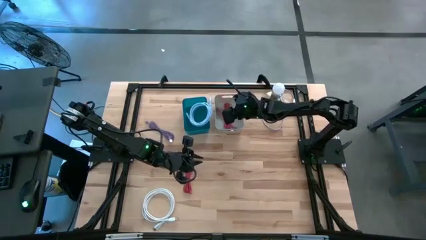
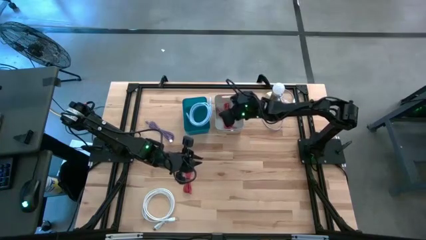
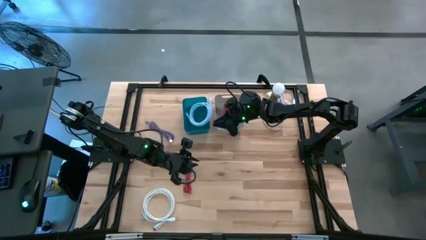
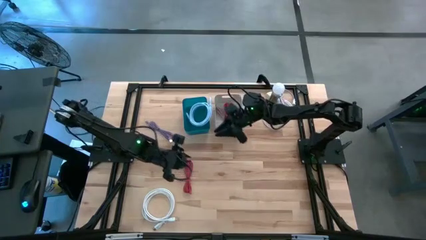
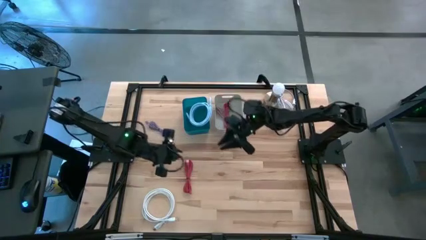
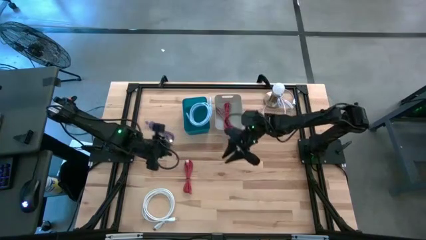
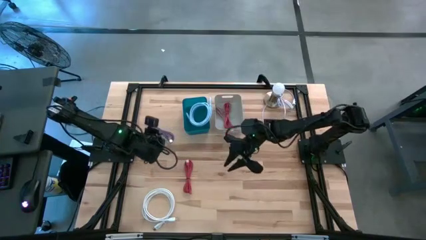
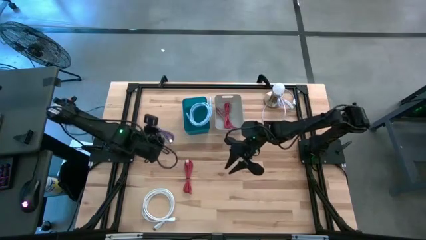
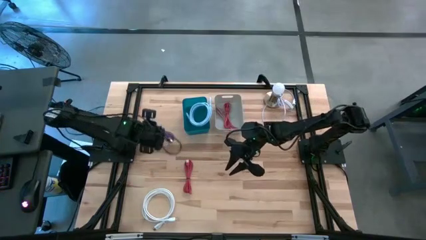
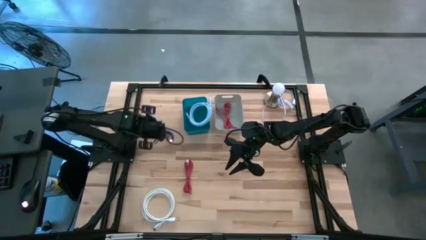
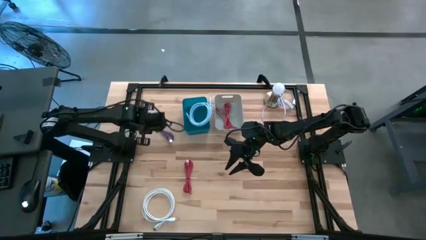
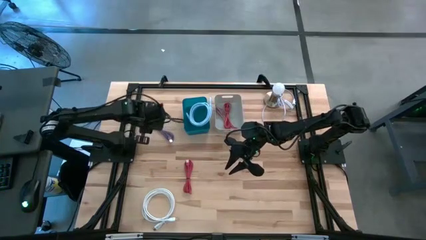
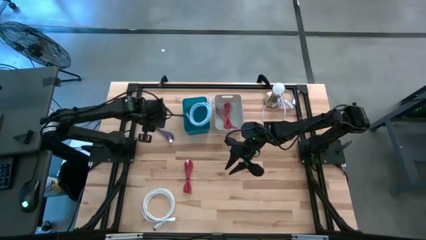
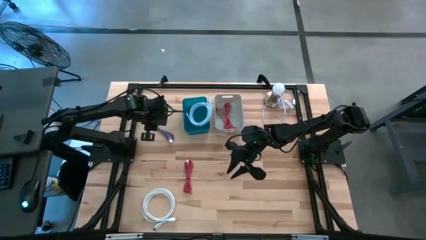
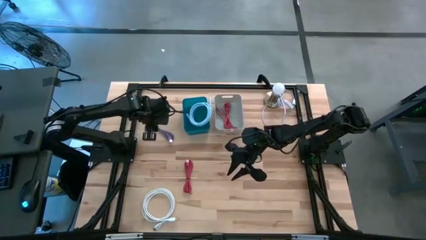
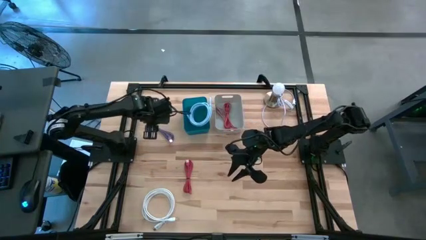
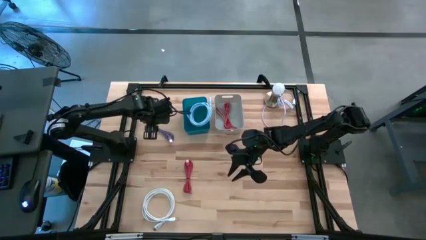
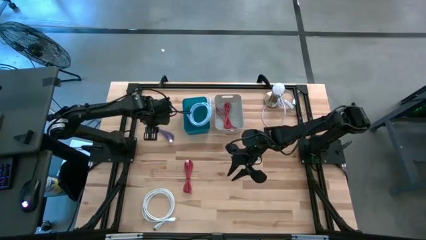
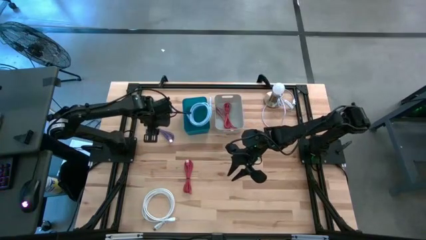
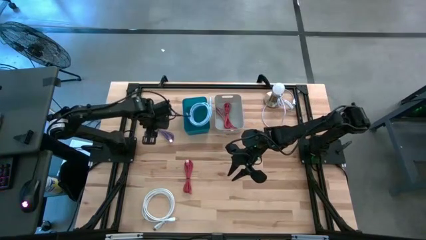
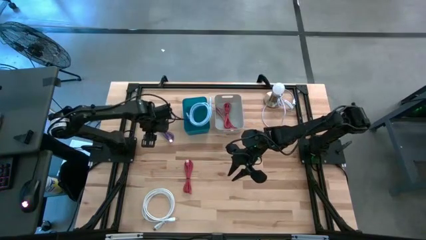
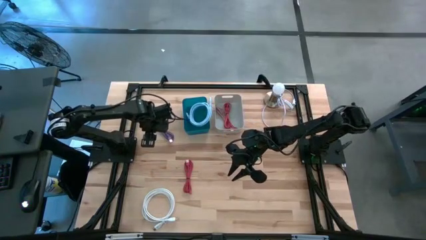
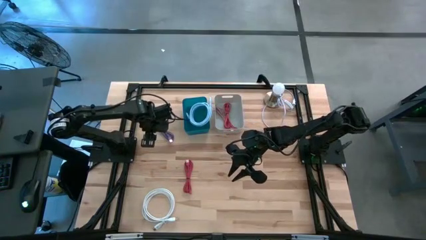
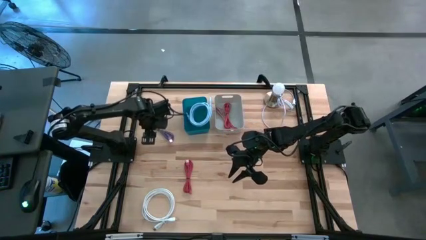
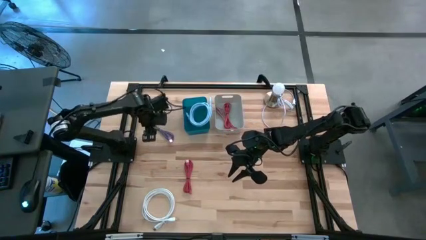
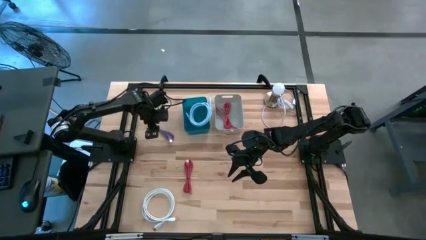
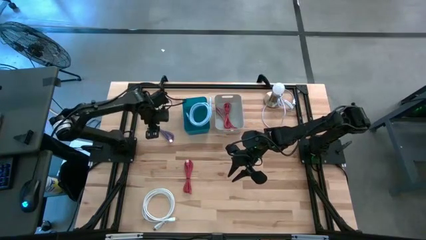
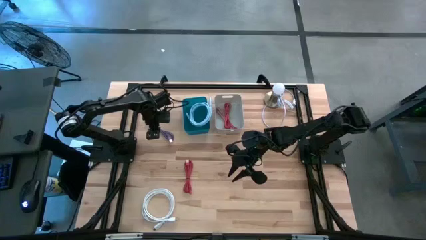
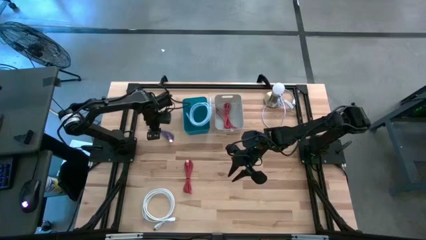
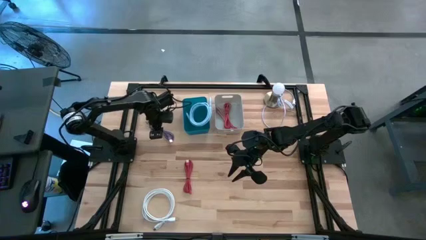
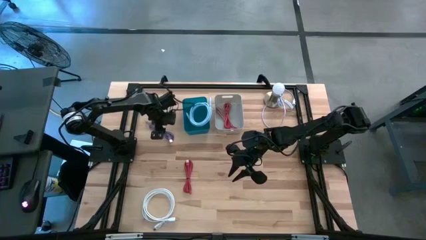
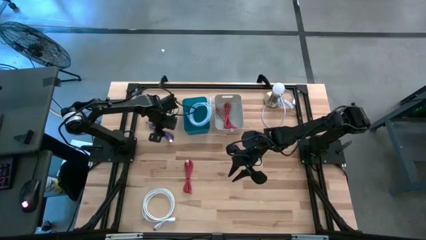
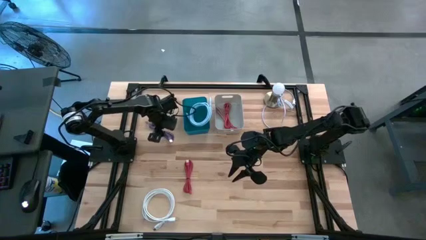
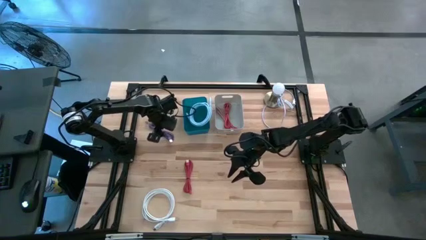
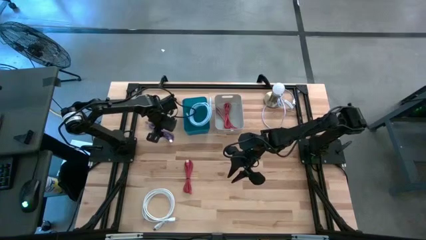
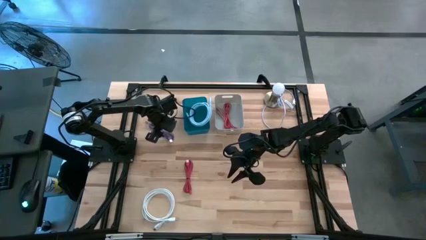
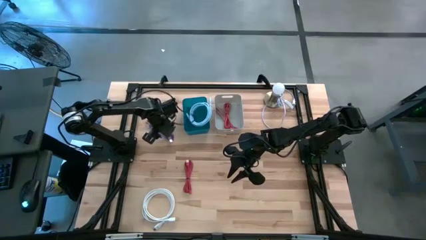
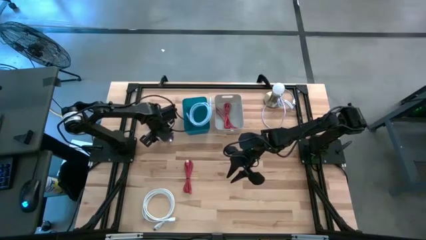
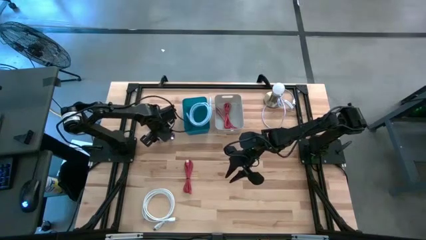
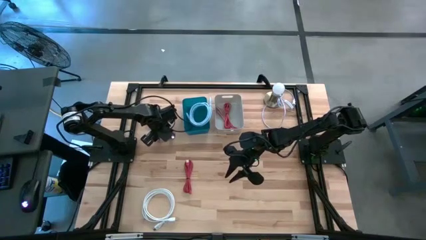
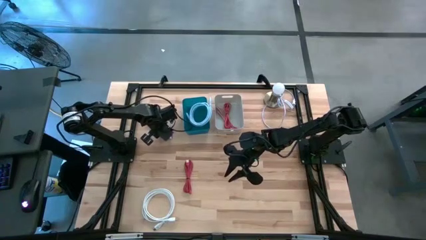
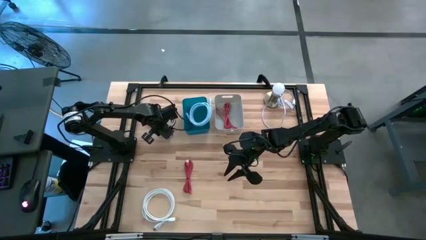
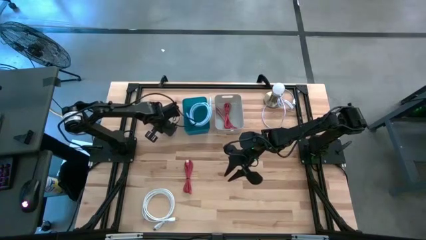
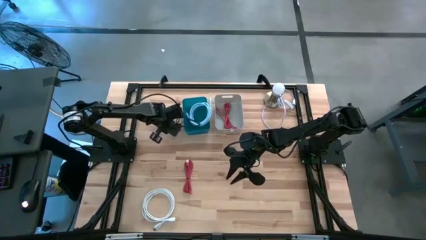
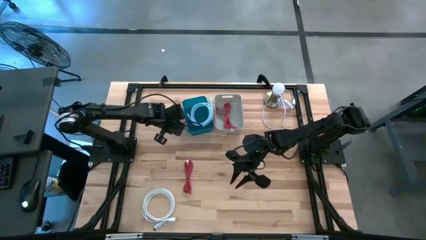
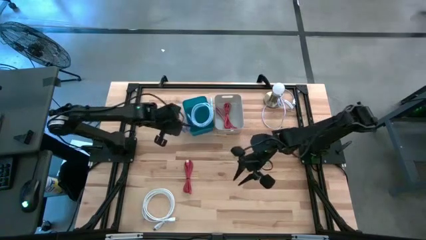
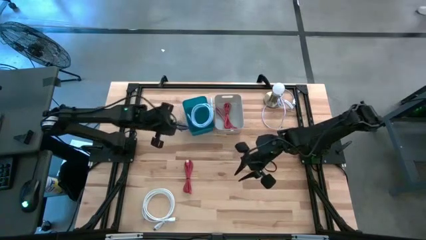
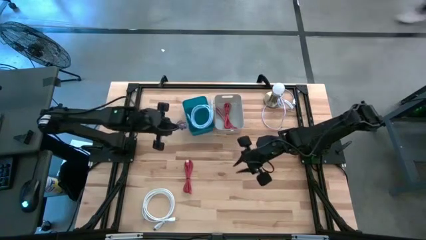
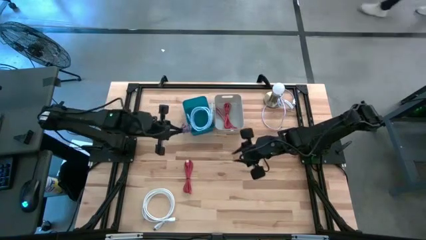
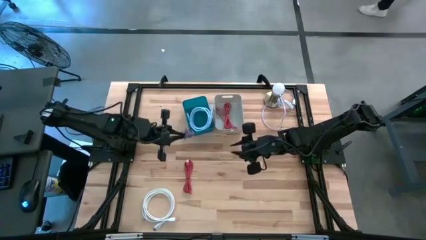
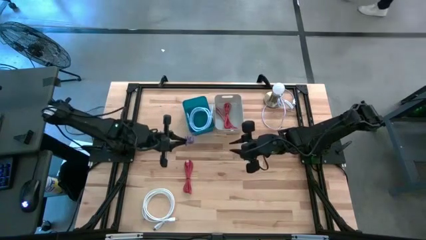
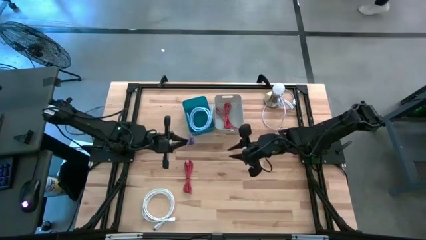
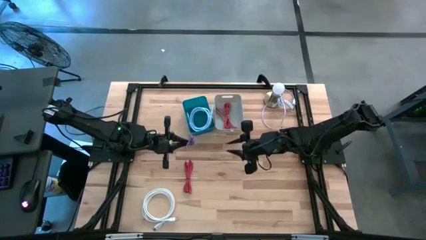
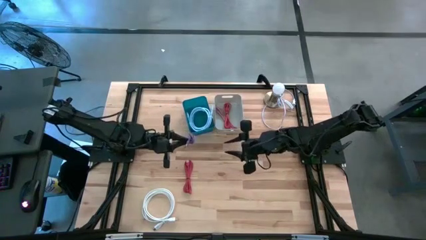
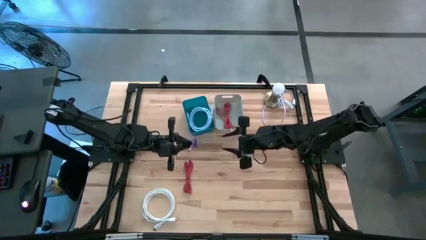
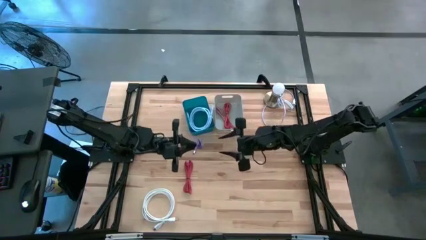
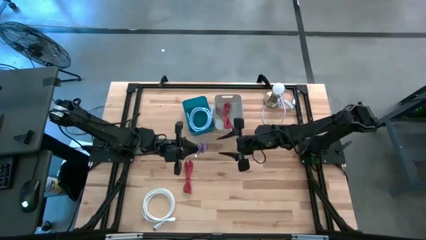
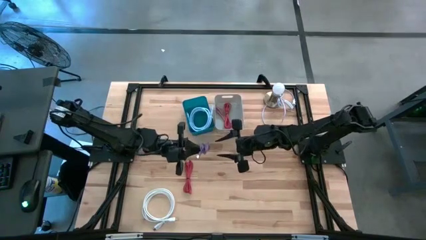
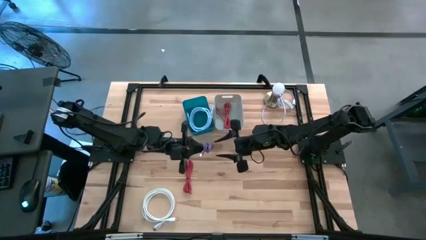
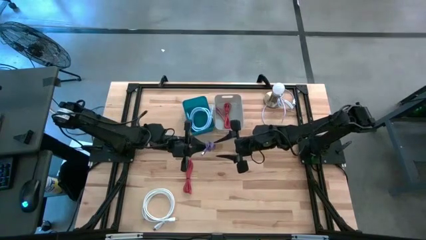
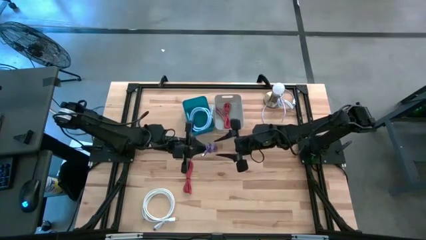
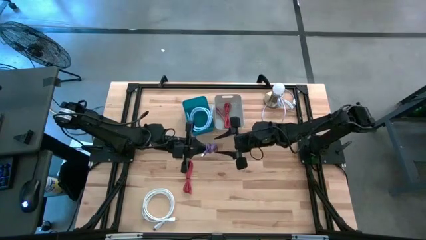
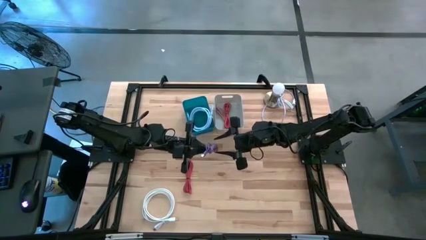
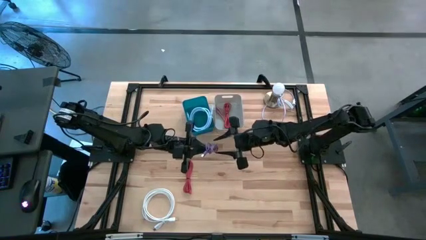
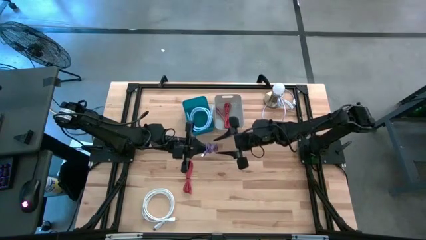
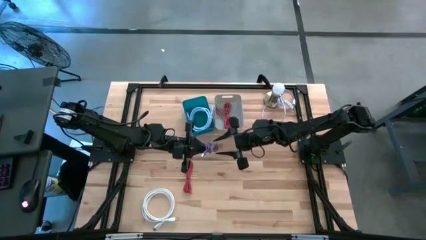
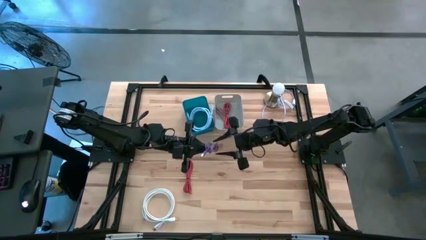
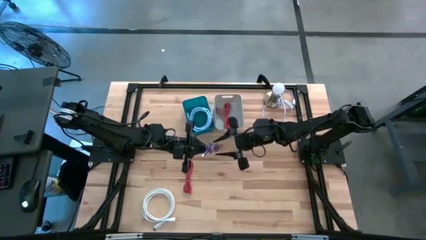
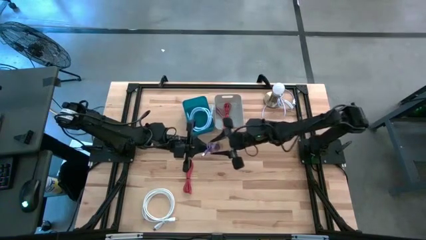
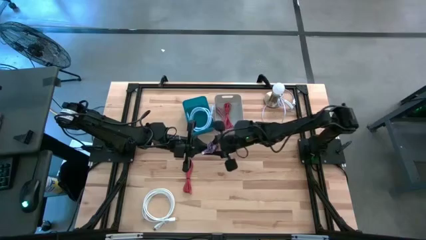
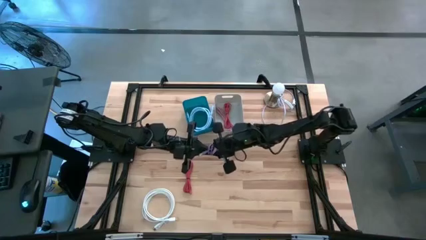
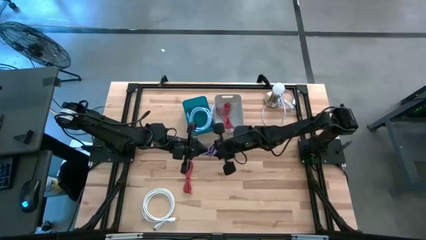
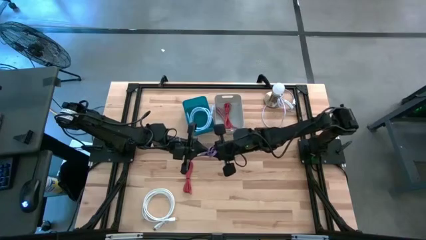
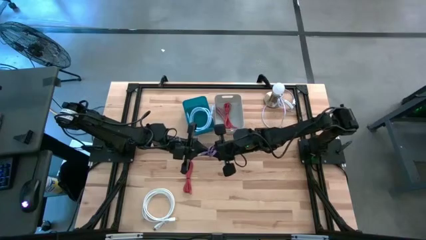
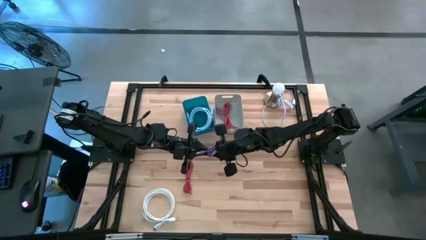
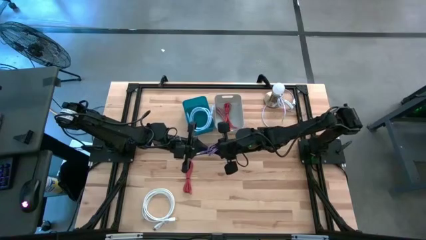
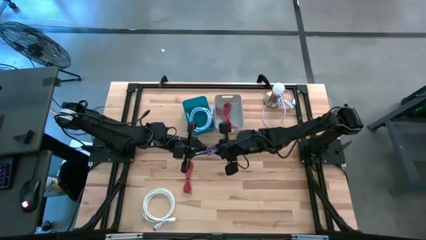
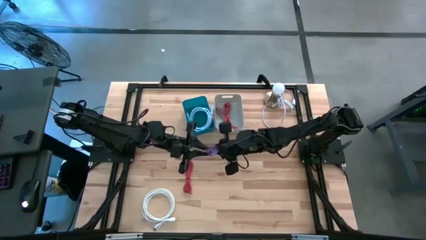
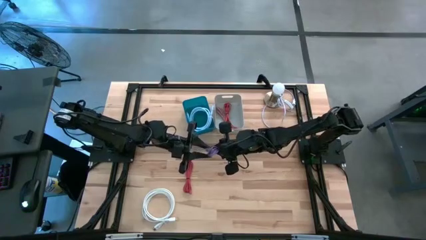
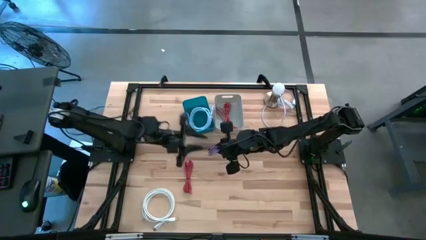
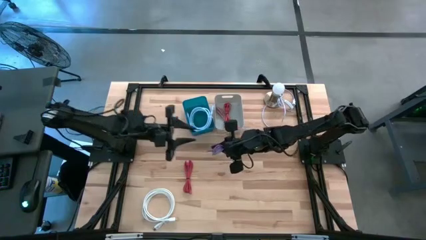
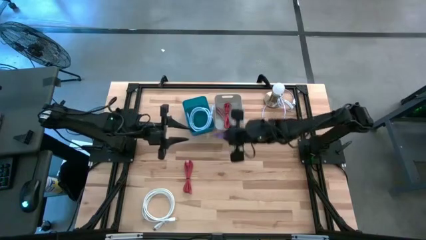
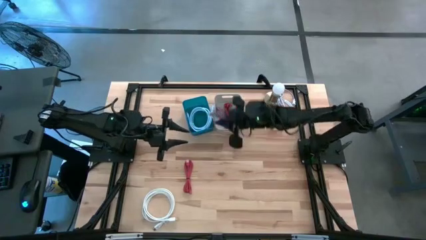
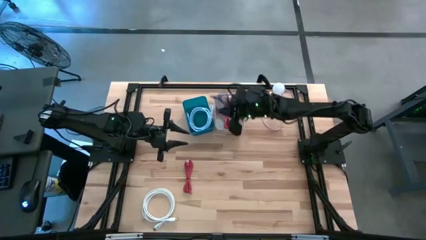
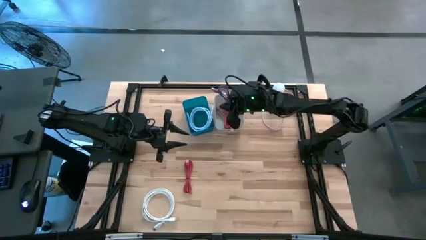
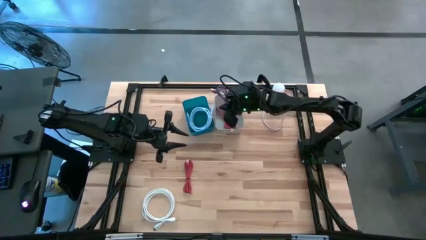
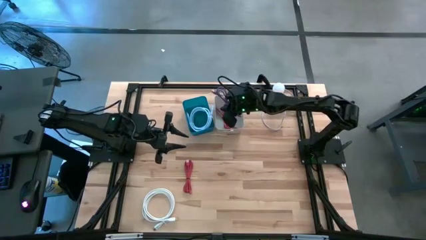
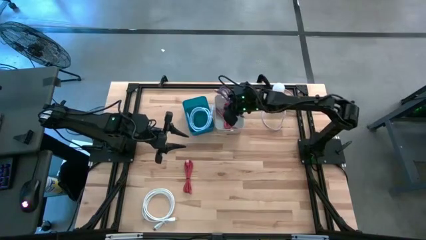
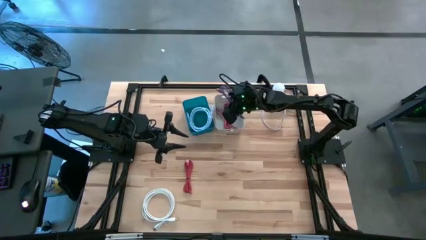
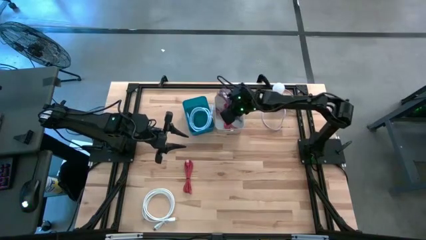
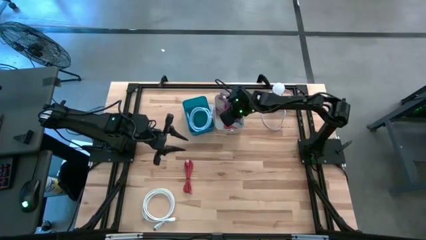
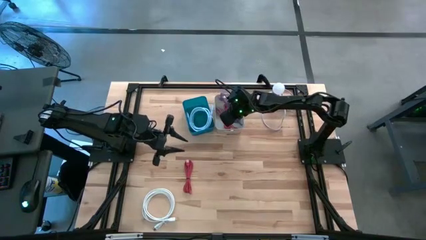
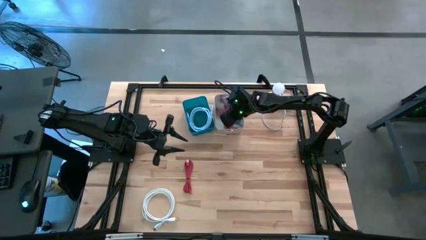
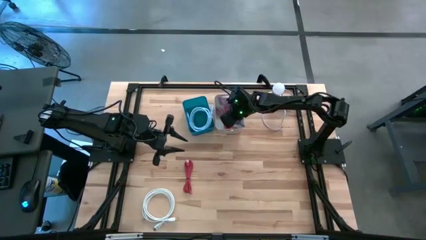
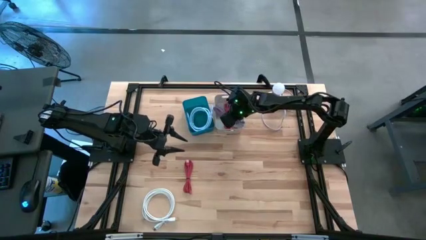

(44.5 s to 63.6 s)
Task: Pick & Place USB Port
Put the purple charger cable into the gray bin
